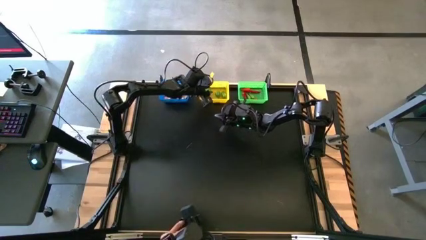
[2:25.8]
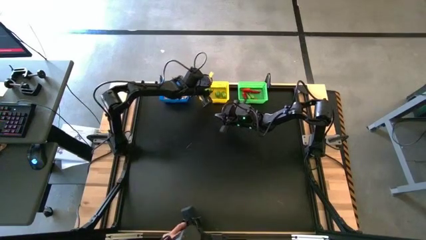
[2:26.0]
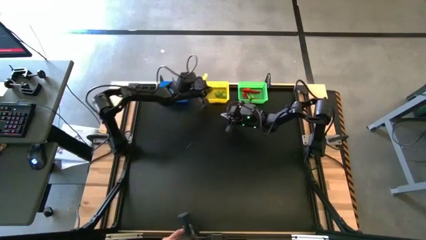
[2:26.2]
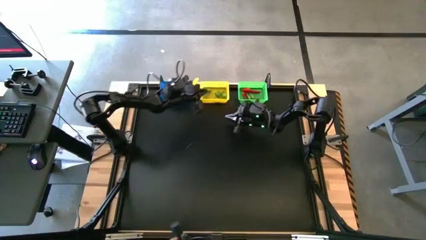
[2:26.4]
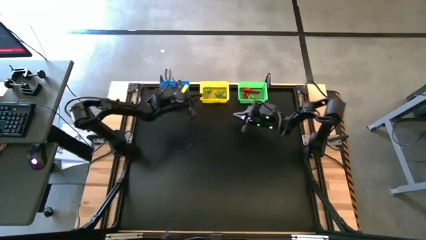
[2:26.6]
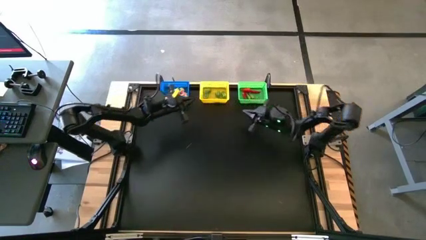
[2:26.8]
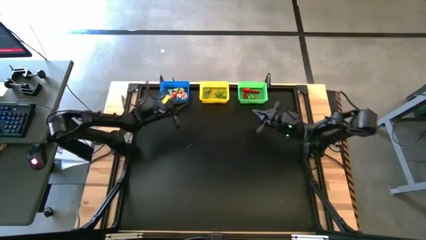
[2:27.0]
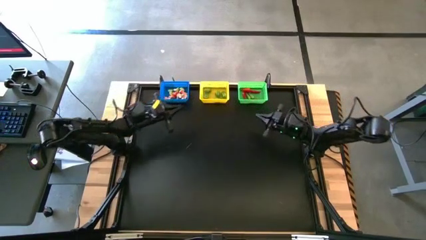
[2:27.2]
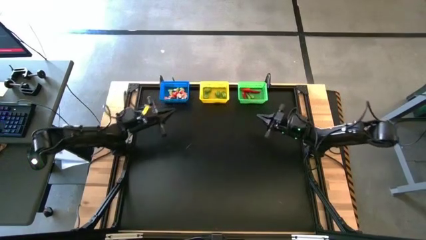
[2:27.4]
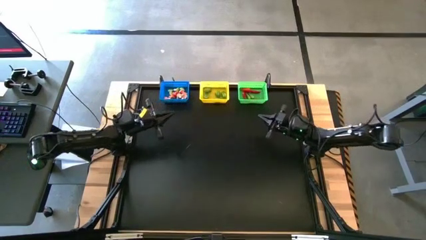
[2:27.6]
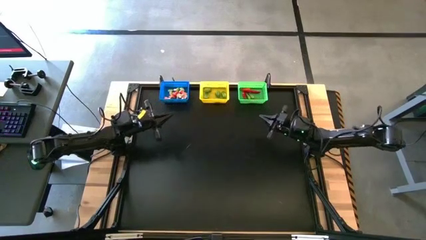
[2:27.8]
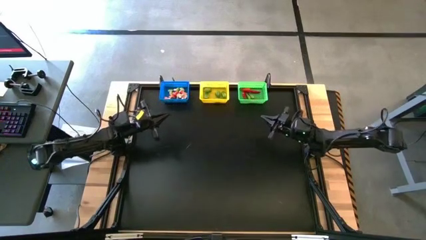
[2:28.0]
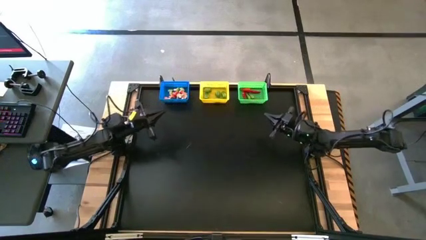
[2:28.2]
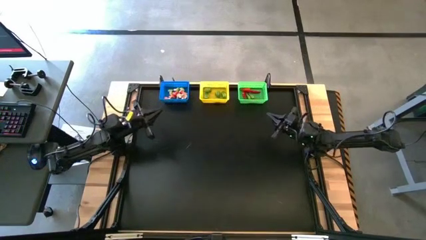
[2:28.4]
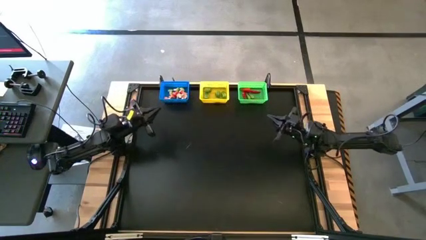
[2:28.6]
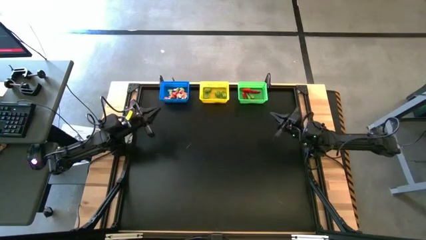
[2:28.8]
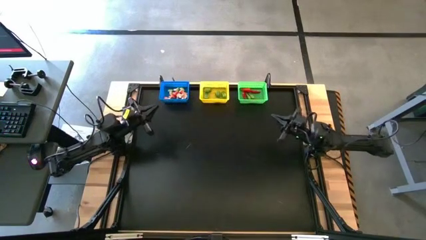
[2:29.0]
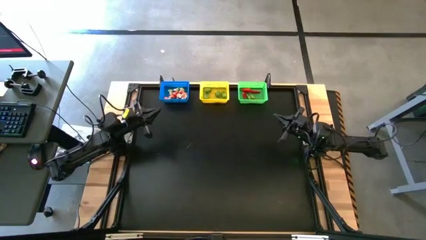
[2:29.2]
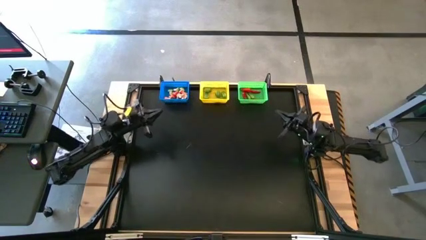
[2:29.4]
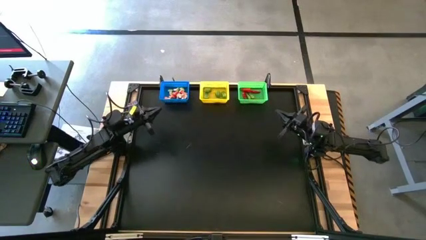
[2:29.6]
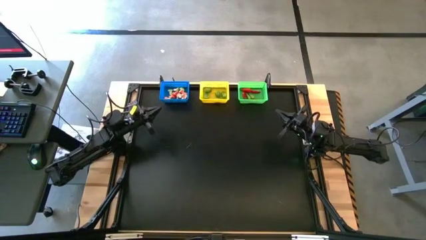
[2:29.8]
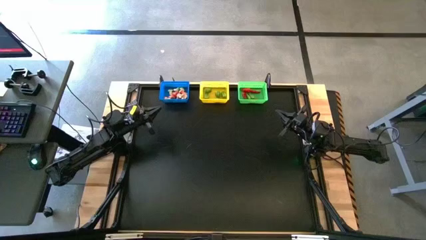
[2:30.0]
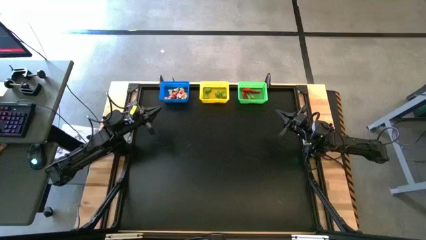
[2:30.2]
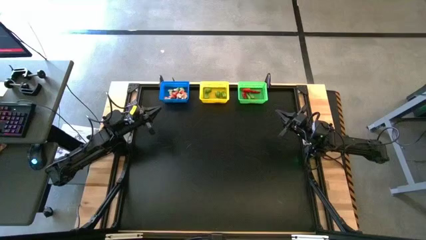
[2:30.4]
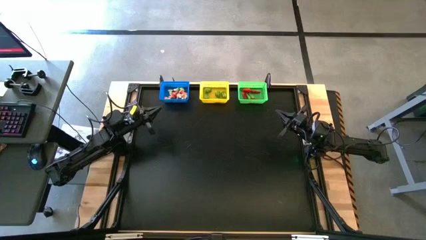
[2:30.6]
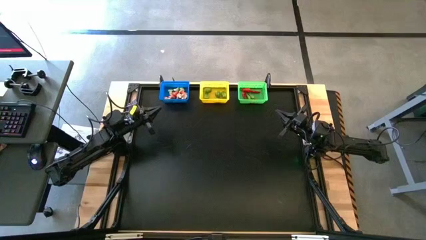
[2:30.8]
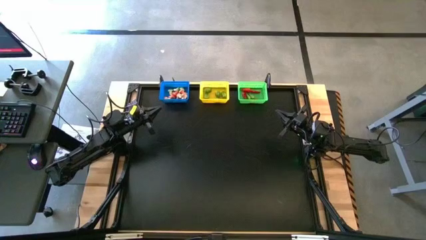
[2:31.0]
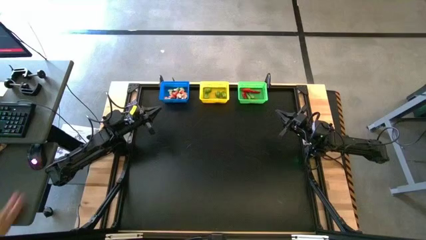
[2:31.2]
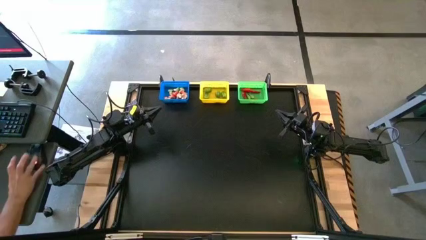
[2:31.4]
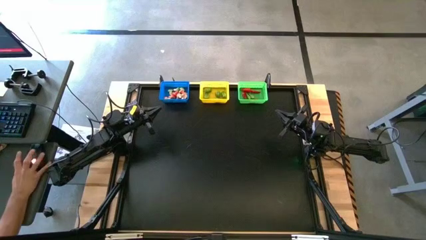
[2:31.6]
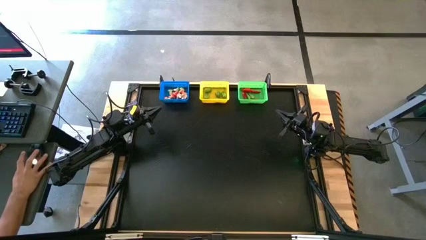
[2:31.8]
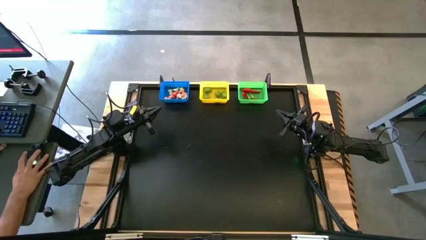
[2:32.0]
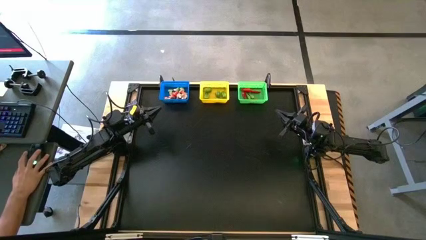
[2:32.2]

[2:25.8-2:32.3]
Task: Sort produce into baskets
Return to Home Position

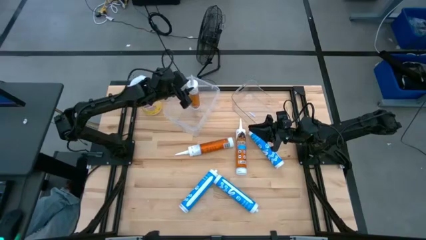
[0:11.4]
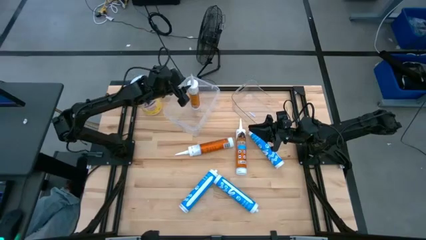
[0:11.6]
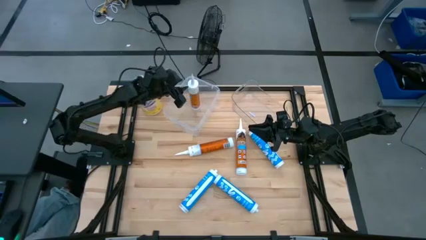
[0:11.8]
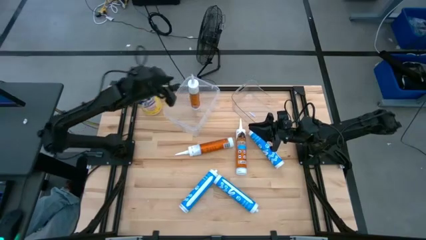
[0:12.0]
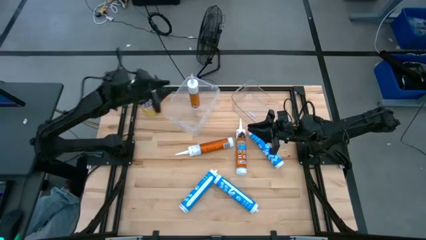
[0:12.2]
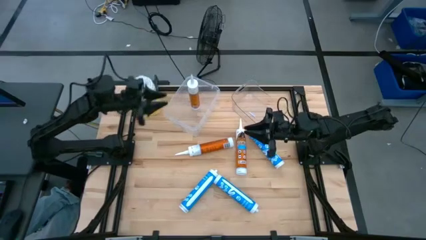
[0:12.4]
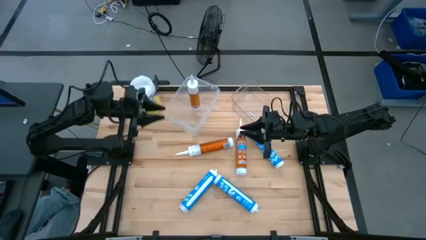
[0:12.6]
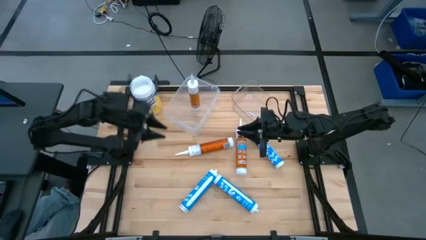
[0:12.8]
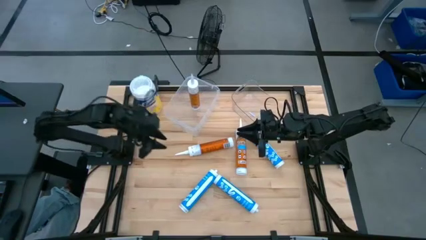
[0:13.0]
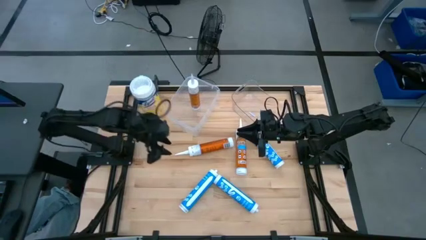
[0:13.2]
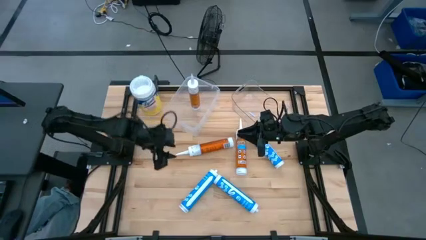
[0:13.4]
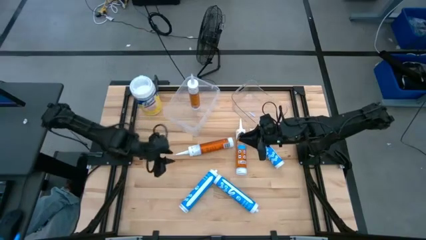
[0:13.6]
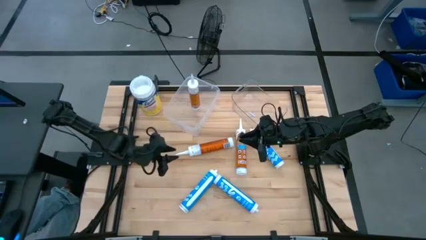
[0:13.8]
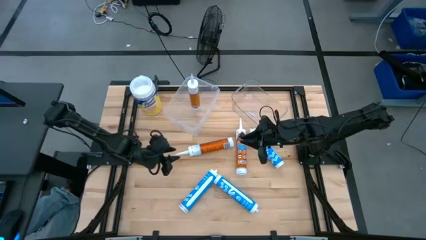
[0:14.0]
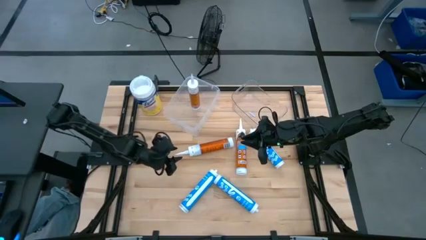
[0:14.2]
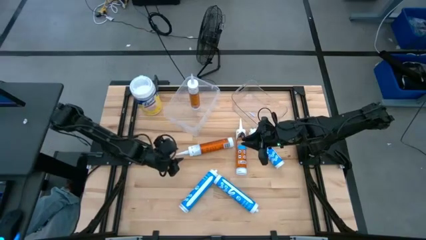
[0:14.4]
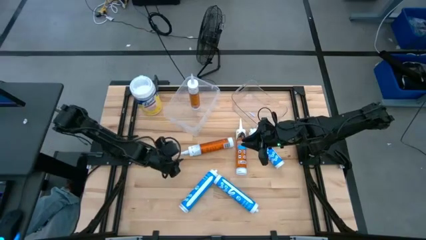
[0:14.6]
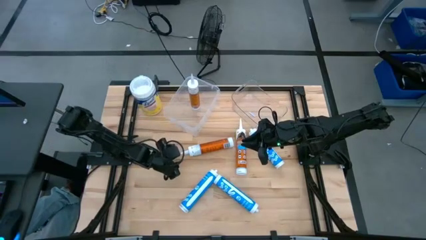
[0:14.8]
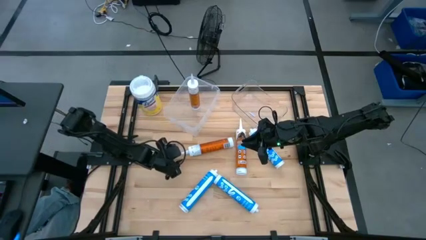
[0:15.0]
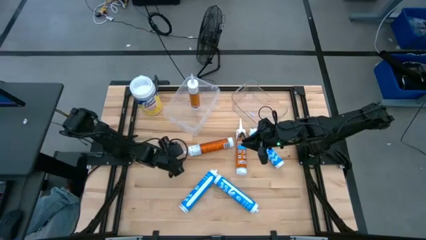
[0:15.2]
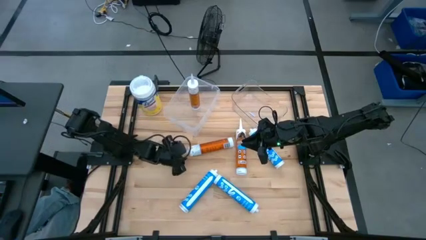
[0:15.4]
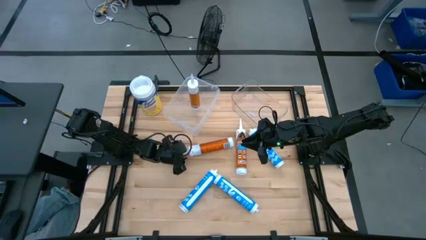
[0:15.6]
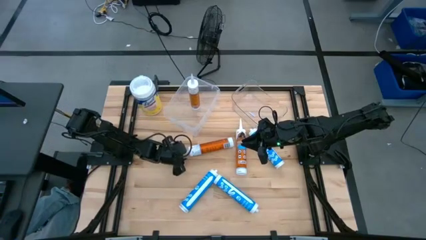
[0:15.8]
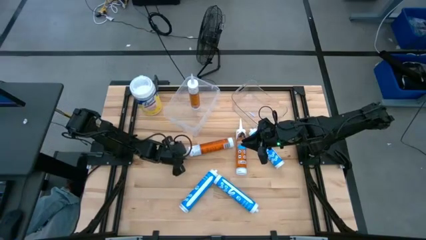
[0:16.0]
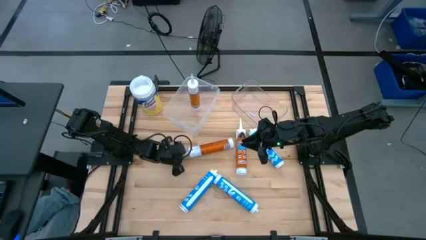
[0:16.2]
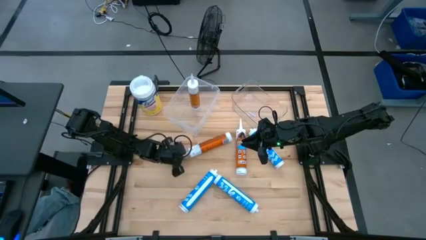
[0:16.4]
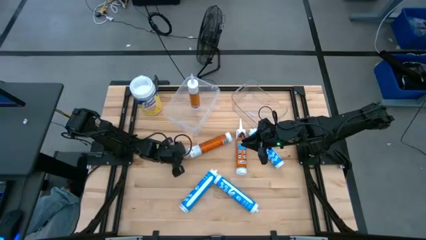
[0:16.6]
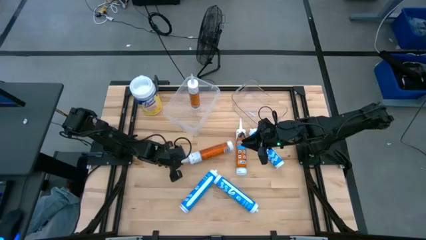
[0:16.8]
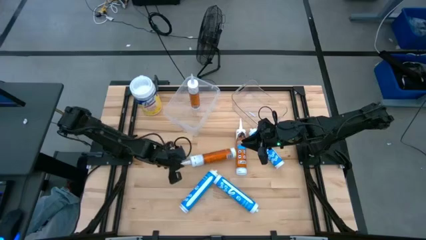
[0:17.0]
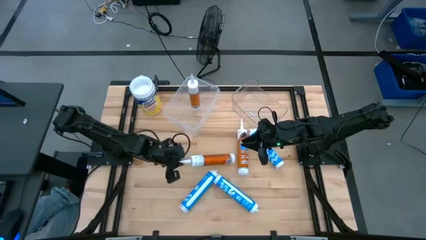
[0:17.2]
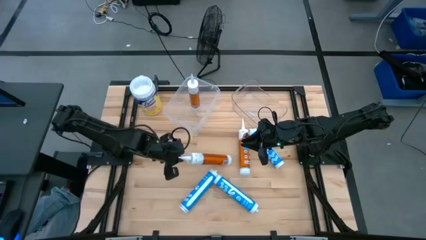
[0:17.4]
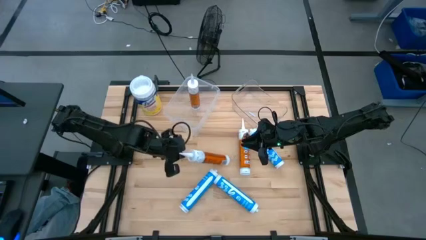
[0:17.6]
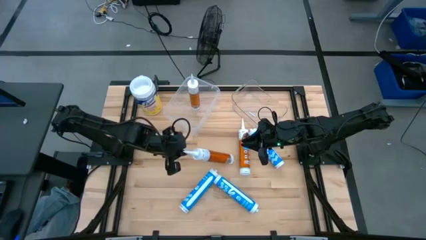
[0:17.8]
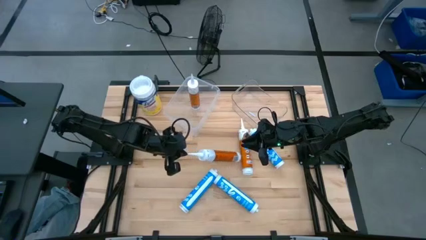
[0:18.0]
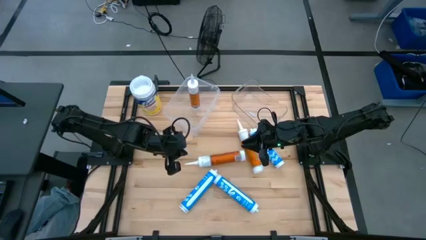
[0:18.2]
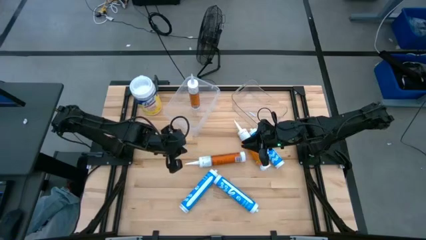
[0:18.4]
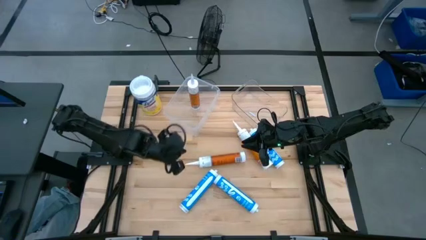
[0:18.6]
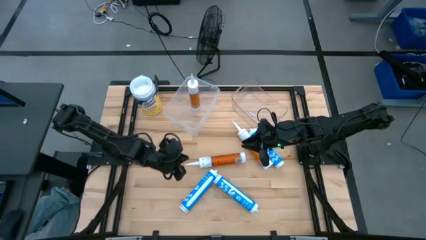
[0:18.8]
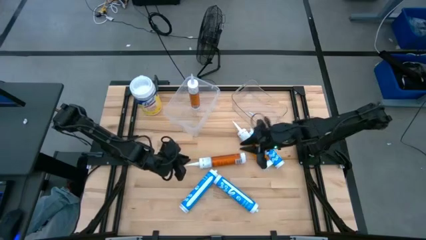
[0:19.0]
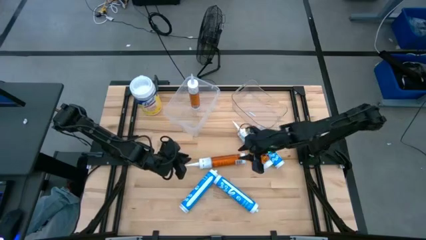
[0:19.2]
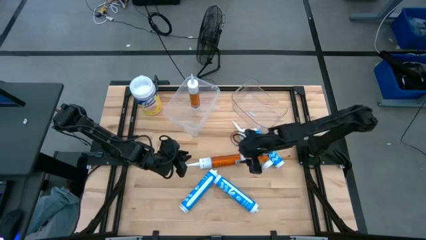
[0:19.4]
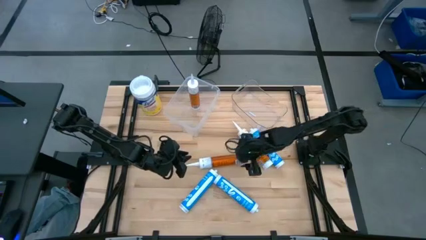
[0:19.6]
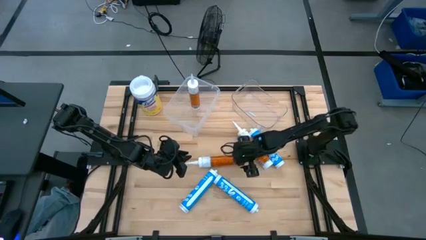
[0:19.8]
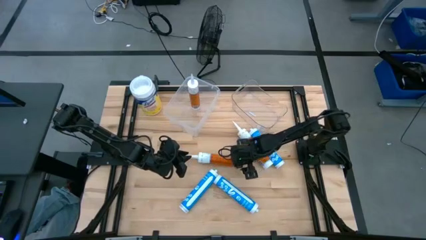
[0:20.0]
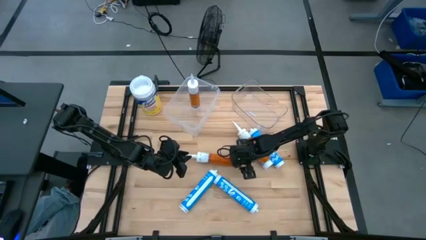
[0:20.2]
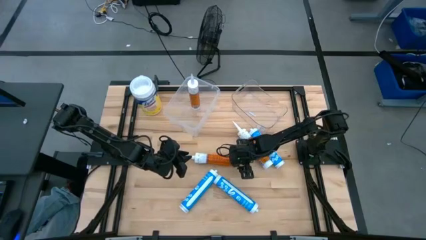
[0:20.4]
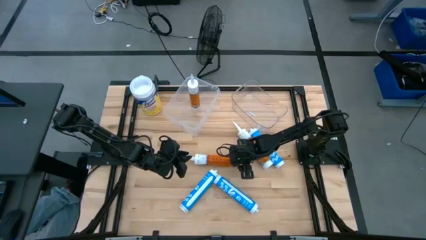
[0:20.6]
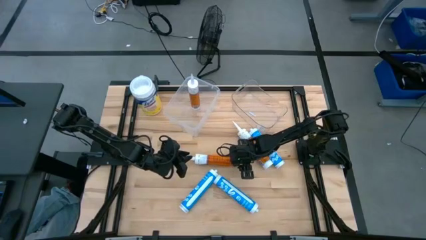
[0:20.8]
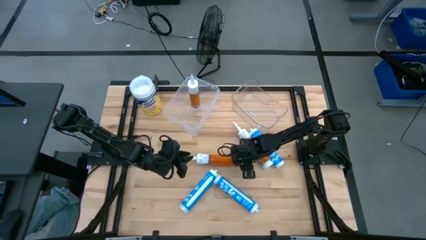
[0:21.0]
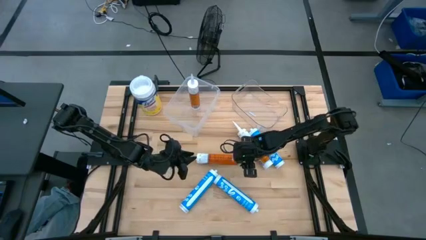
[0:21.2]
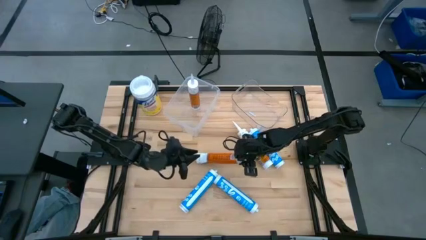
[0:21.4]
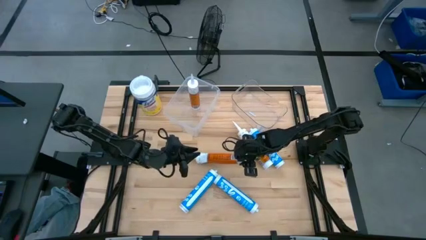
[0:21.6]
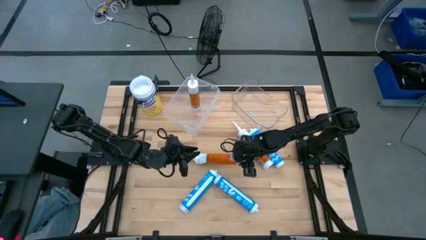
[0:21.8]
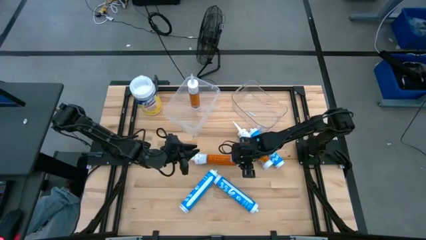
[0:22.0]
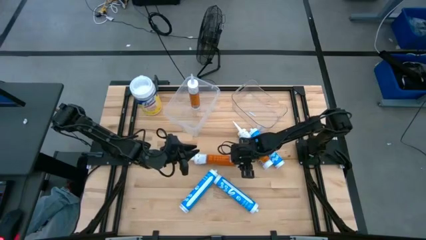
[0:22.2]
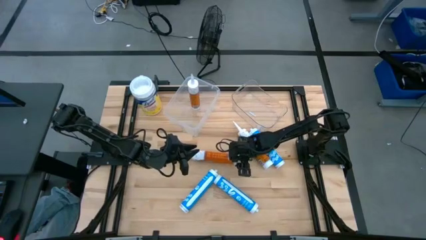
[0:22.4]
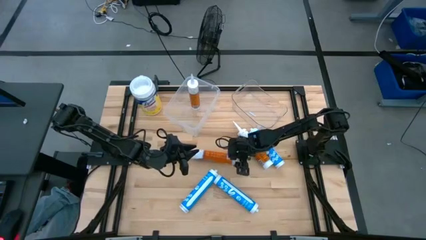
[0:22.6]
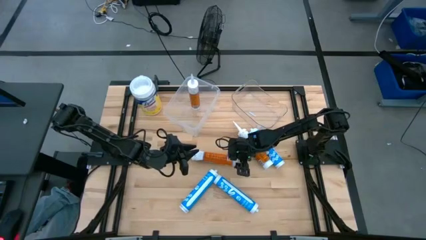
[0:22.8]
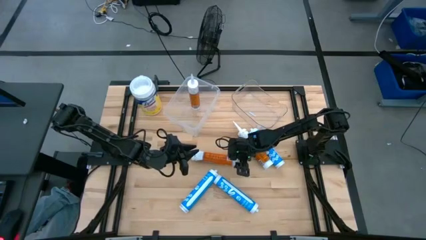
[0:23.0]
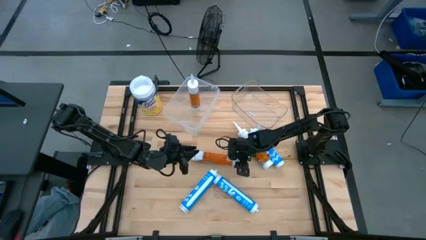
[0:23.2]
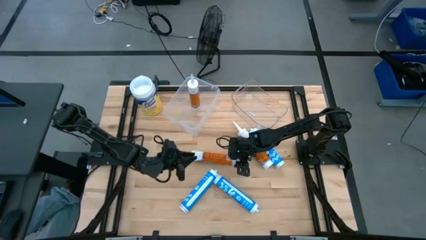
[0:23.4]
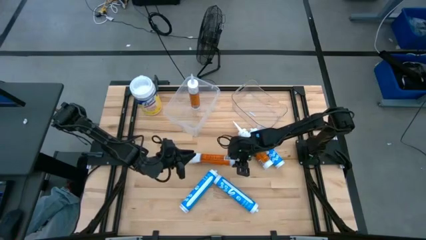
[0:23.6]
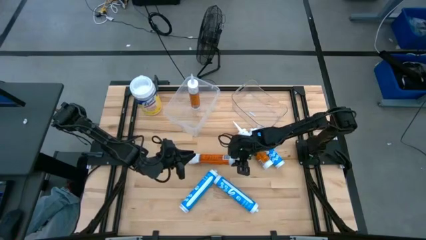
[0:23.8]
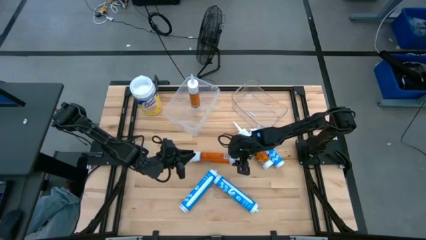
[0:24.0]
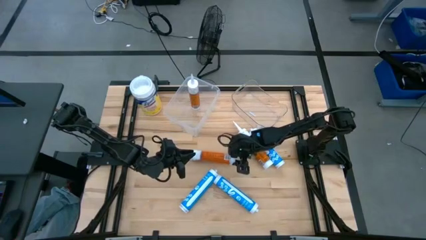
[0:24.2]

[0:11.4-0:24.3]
Task: Pick & place silicon tubes, Sealant and Lysol wipes
Put the left orange sealant into the left transparent bin
